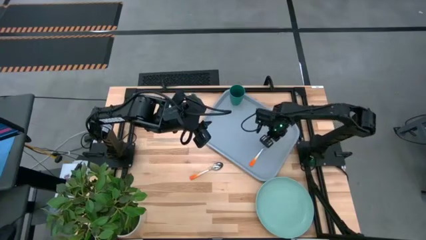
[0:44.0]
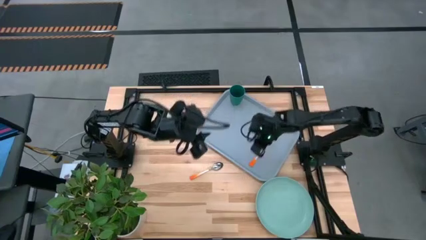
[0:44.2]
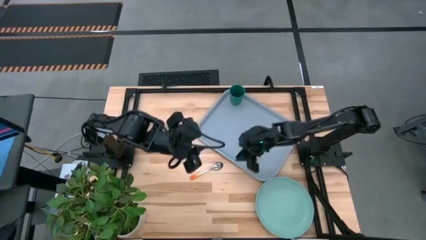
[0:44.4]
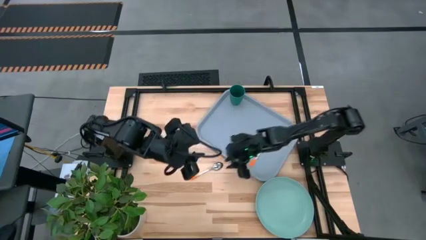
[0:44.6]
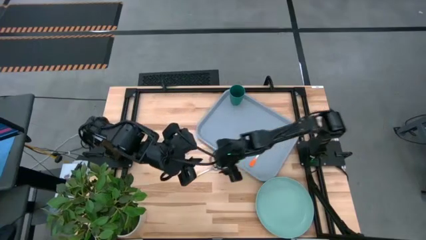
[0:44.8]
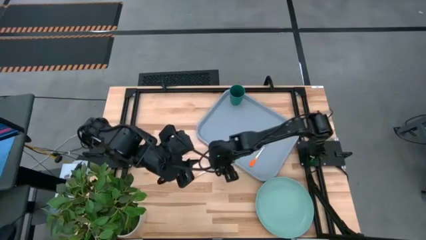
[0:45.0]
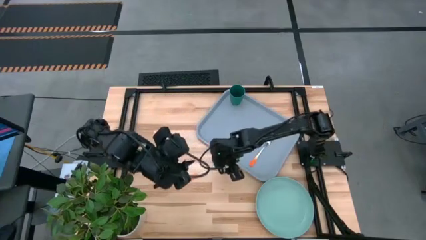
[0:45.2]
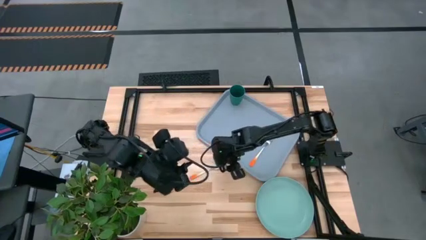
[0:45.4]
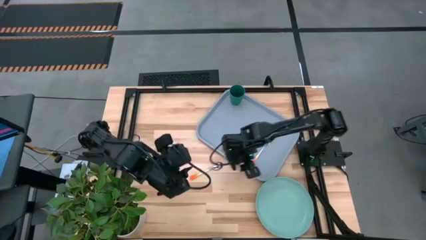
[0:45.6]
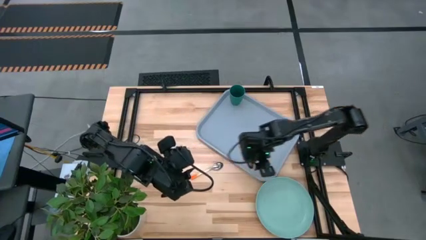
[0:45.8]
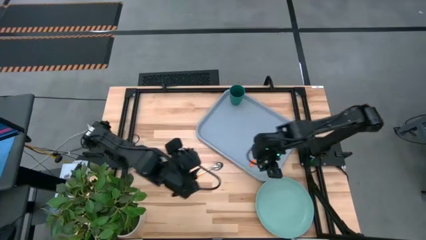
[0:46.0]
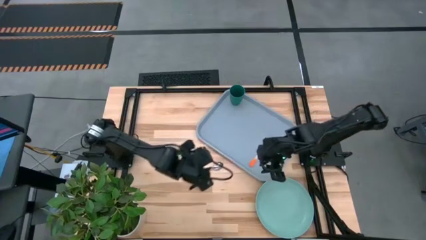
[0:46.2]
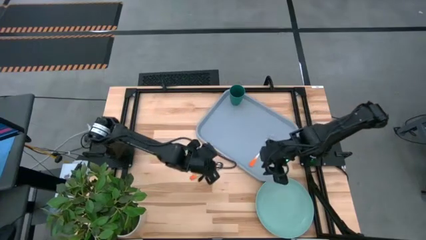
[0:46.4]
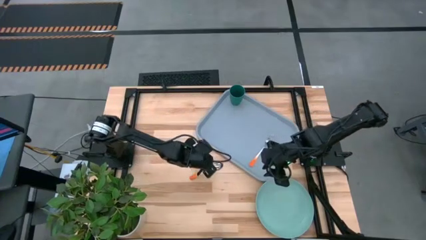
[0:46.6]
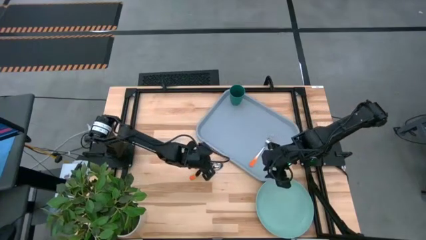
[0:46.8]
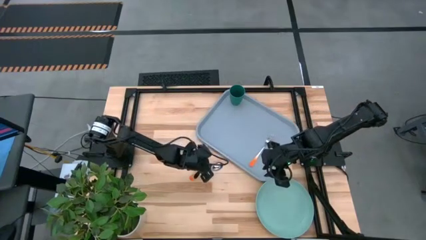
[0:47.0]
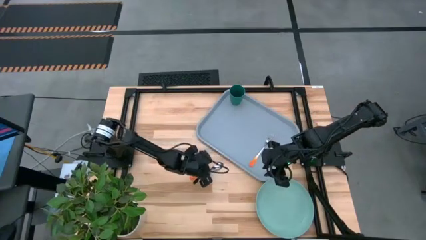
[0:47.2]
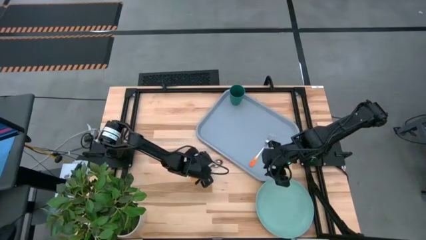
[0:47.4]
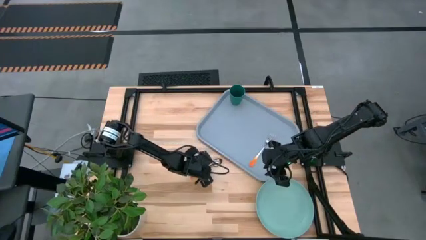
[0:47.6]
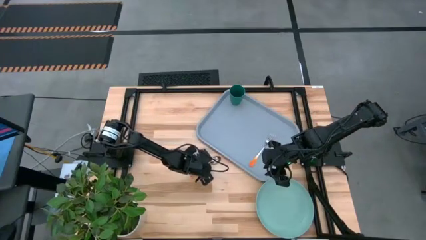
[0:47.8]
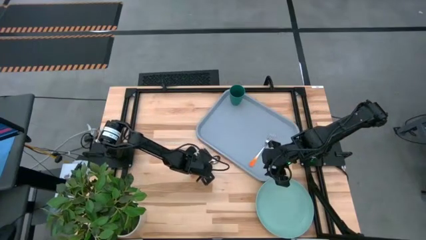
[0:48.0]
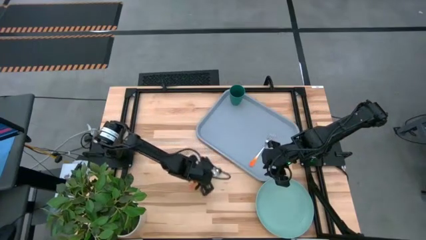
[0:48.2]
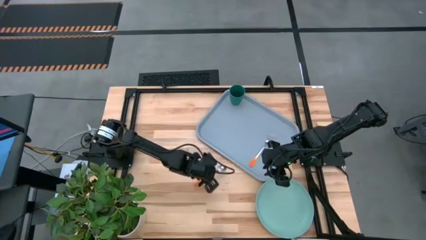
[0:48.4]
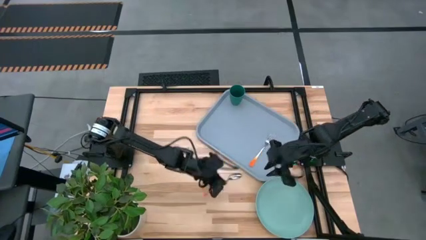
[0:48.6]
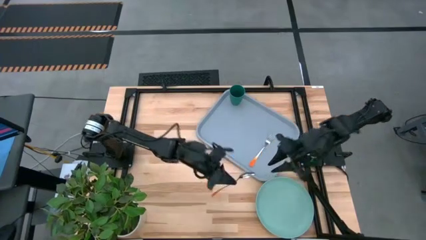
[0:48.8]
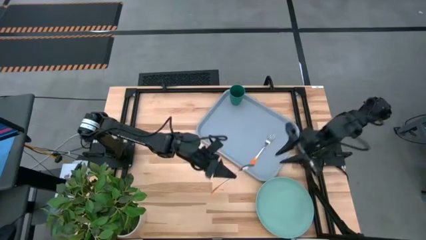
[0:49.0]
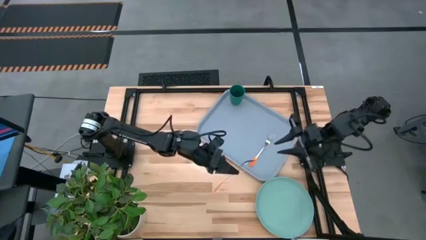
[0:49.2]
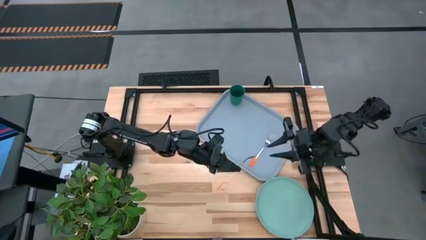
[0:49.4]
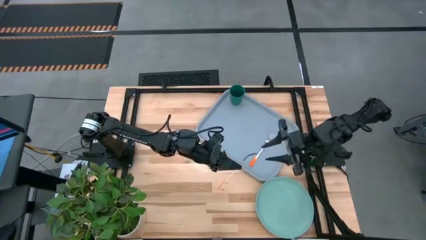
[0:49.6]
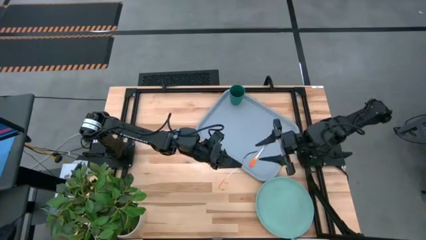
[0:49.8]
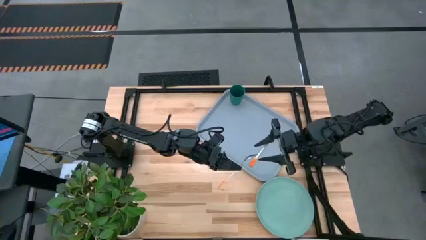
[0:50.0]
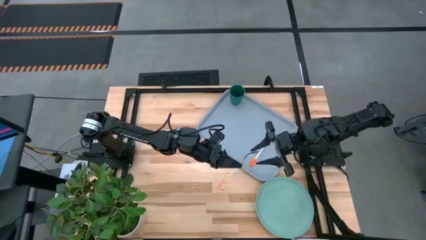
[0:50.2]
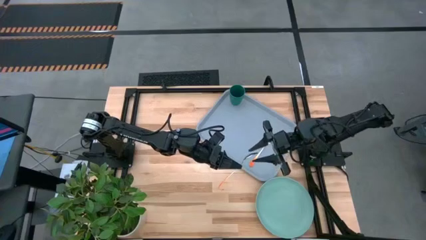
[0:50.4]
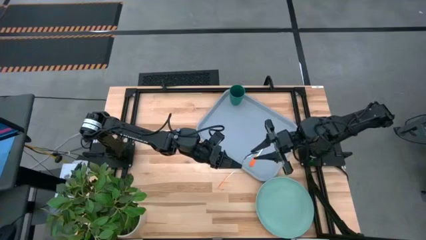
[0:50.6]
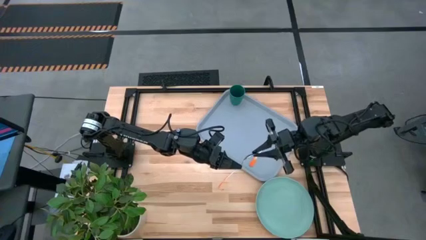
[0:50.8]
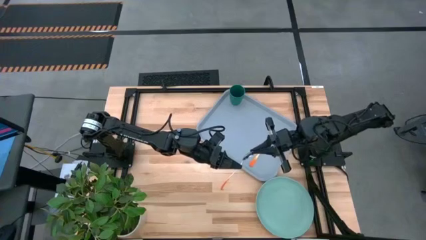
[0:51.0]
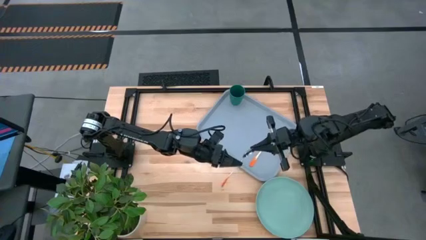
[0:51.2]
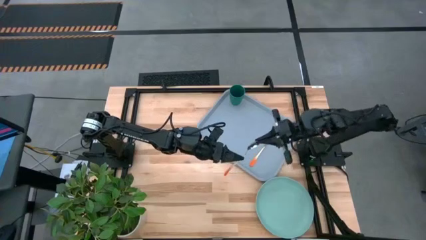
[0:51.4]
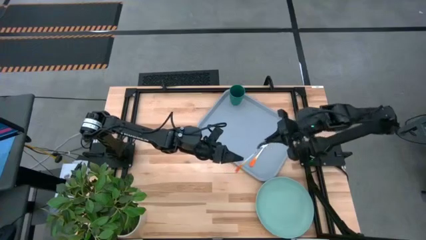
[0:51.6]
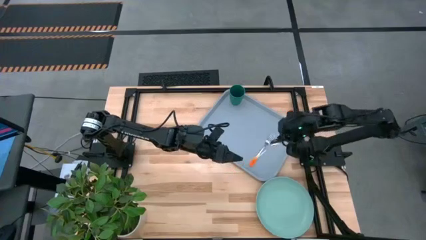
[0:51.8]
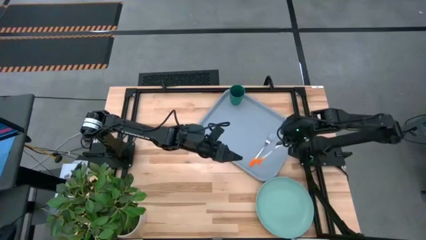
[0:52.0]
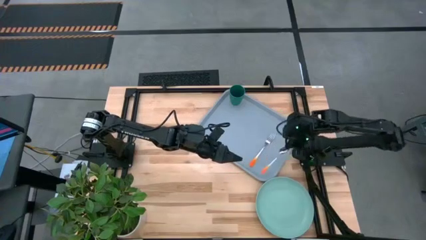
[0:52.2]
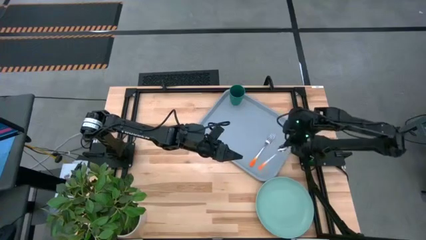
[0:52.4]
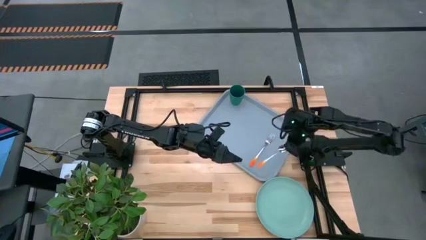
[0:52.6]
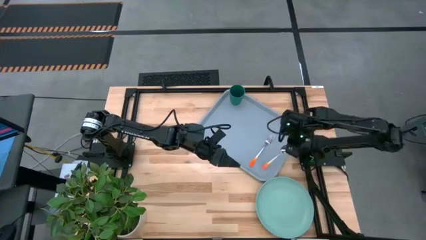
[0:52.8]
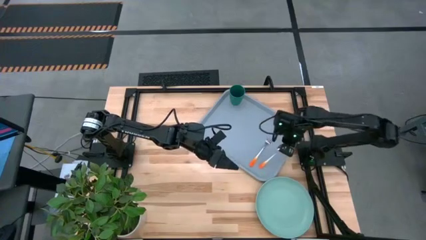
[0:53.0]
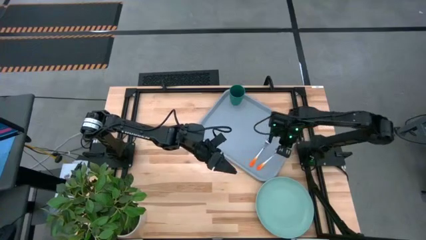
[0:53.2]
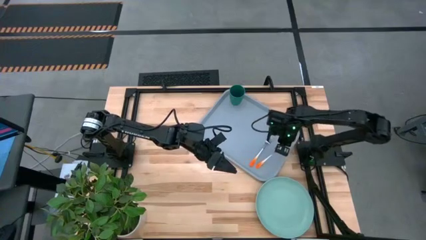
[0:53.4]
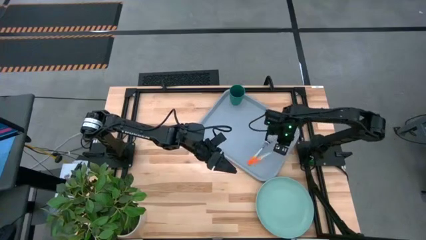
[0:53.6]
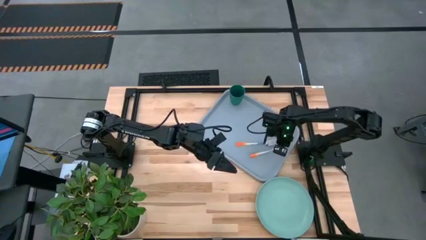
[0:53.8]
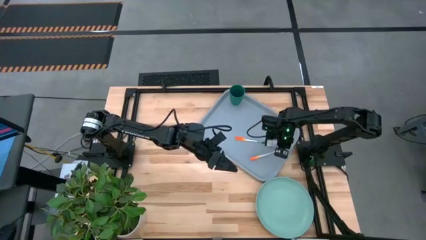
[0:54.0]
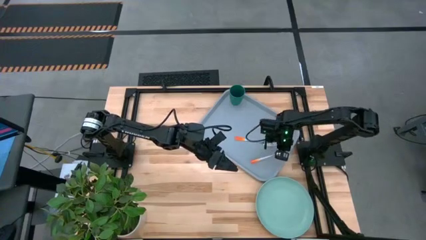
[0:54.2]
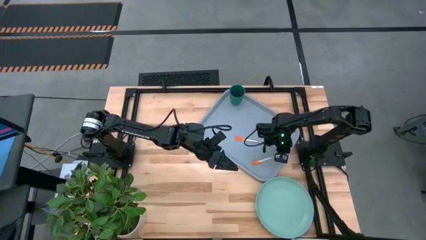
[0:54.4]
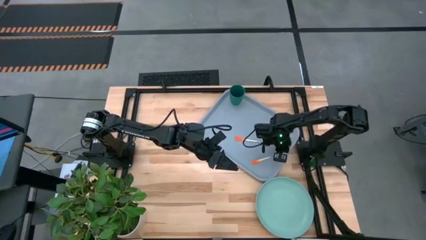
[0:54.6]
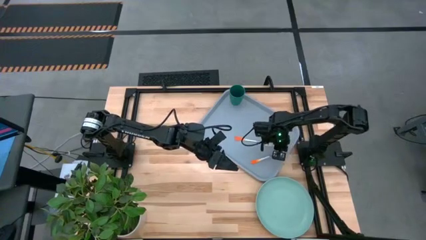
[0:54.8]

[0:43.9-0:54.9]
Task: Pick and place plate/cup/fork/spoon on tray
Put the orange spoon to the right of the orange fork

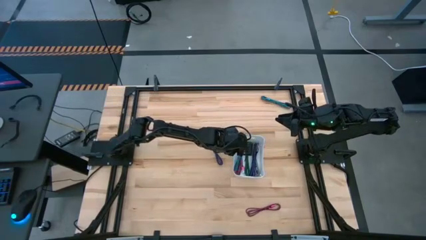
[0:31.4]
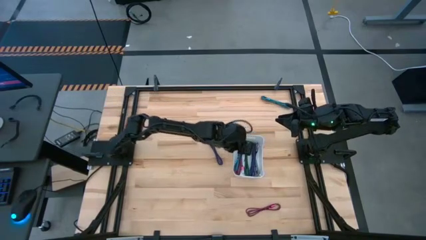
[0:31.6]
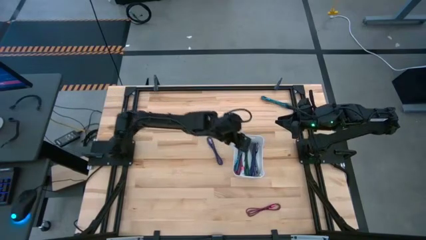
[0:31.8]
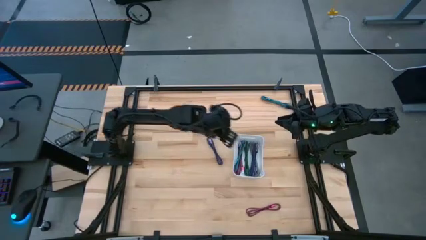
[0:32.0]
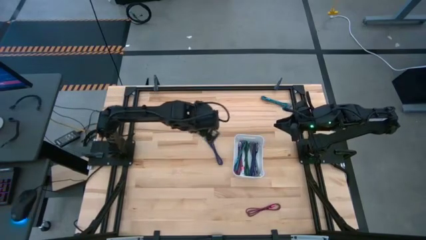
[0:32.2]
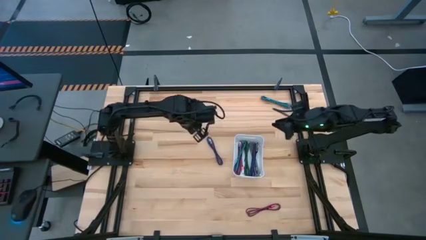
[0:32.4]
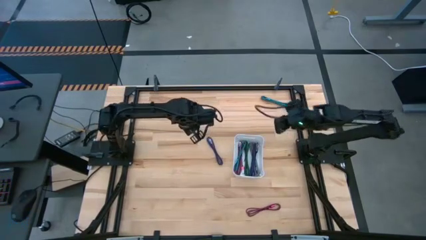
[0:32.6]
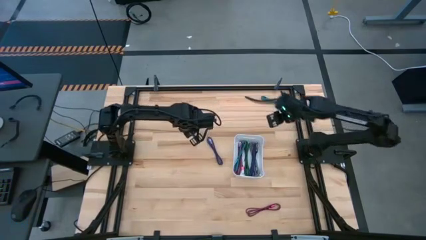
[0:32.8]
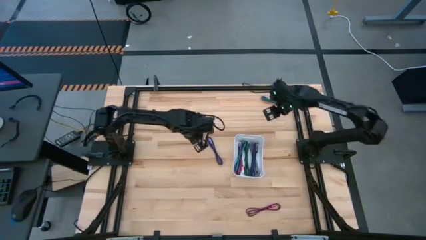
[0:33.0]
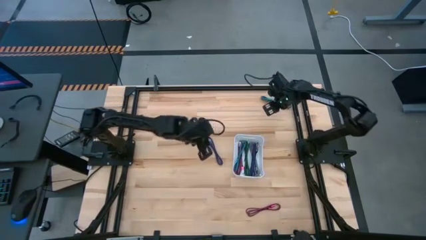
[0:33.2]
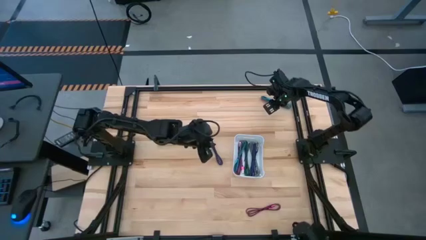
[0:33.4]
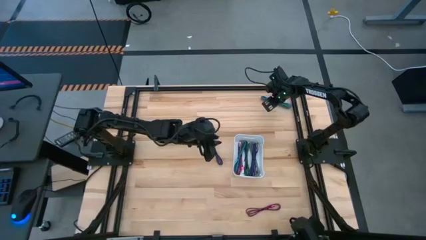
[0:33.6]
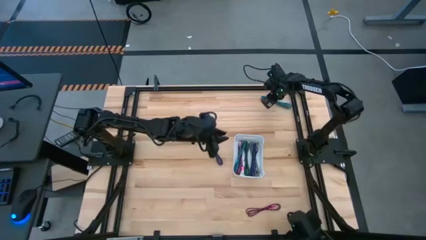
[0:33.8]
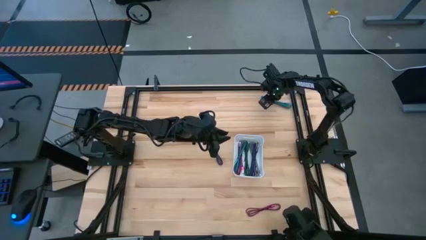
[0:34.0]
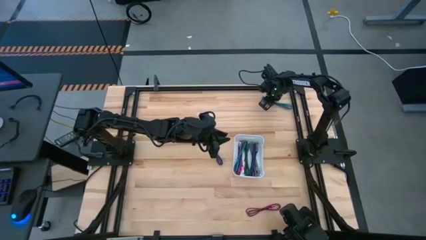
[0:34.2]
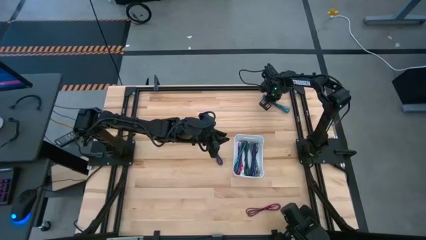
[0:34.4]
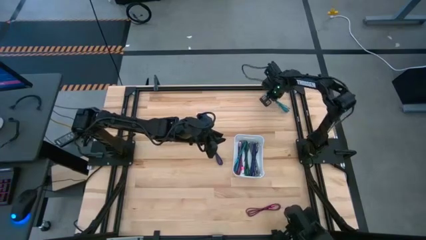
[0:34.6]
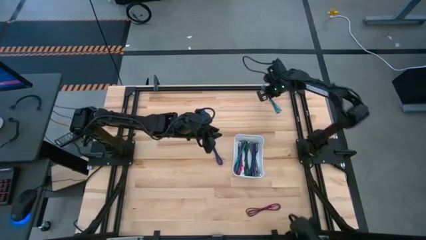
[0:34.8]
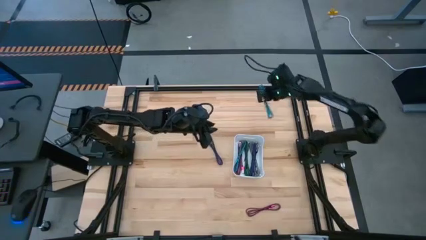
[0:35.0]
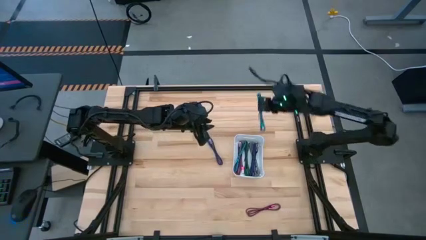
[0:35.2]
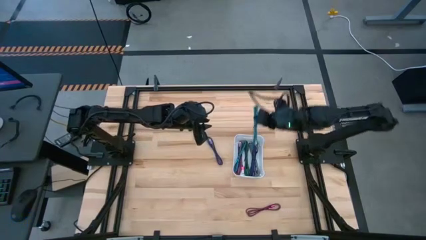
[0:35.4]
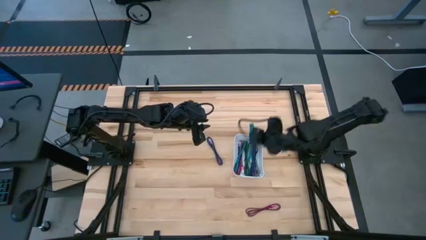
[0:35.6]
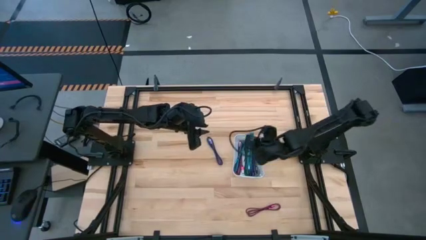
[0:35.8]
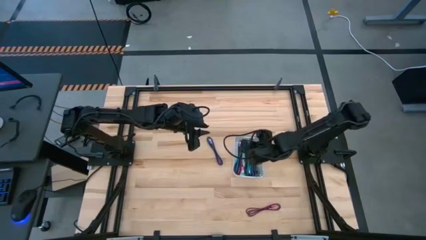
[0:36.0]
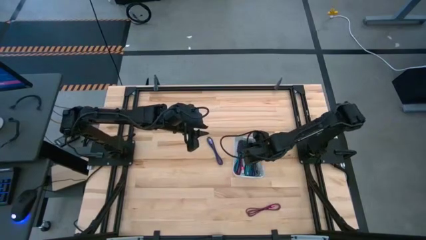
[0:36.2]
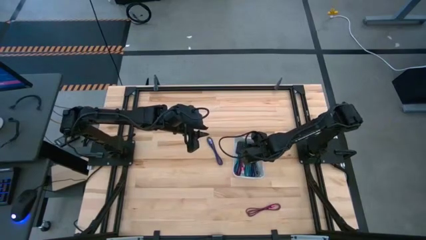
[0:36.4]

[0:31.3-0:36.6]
Task: Pick and place USB-C Cables
Put the blue charger cable into the white bin
